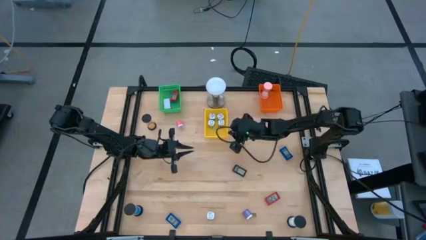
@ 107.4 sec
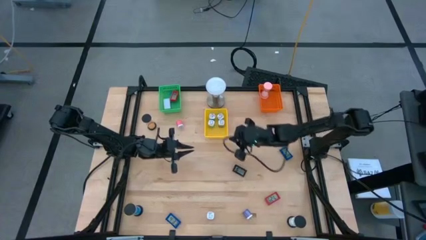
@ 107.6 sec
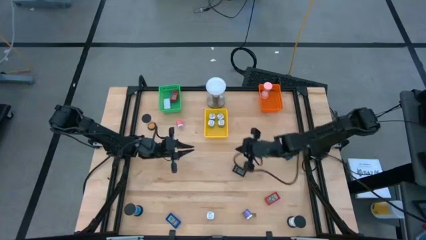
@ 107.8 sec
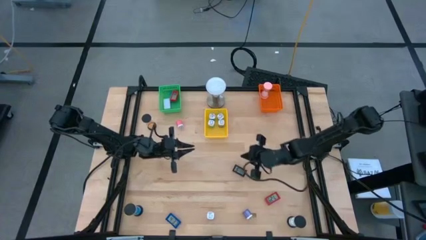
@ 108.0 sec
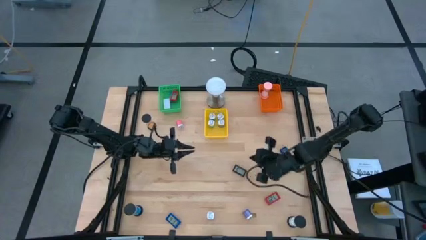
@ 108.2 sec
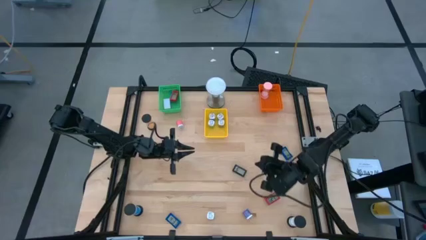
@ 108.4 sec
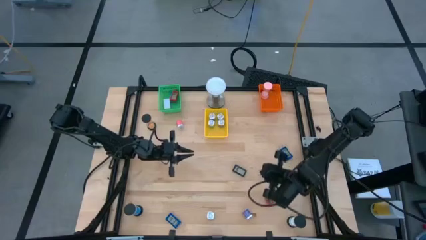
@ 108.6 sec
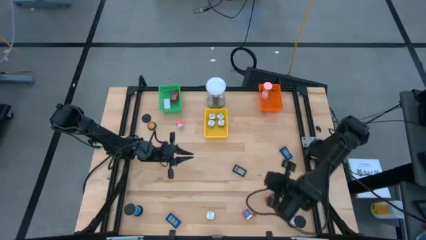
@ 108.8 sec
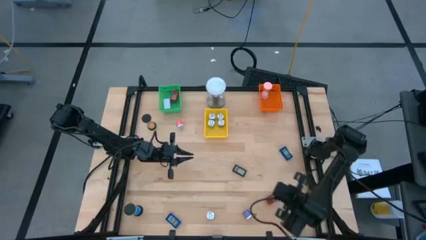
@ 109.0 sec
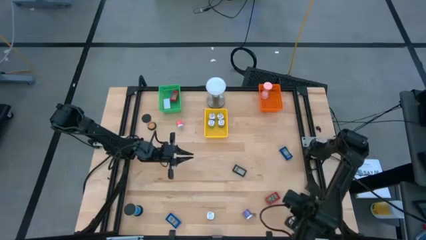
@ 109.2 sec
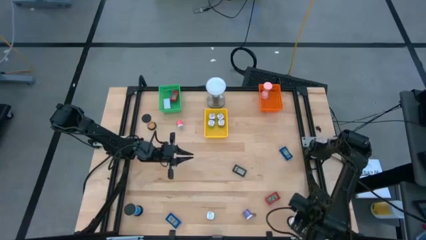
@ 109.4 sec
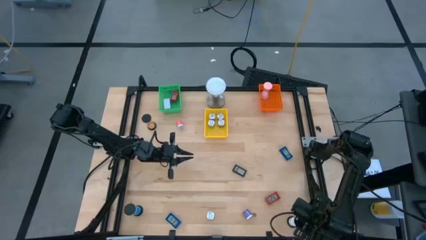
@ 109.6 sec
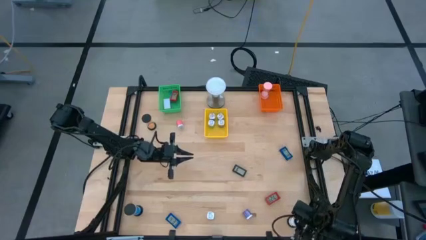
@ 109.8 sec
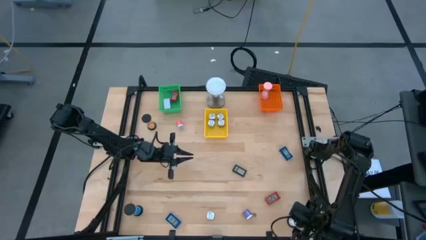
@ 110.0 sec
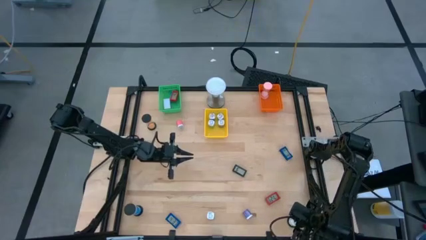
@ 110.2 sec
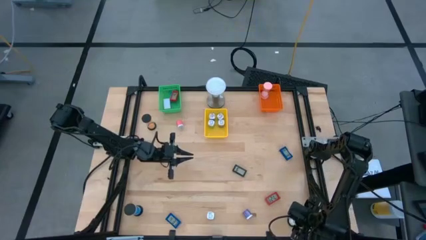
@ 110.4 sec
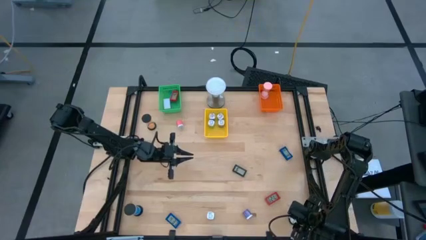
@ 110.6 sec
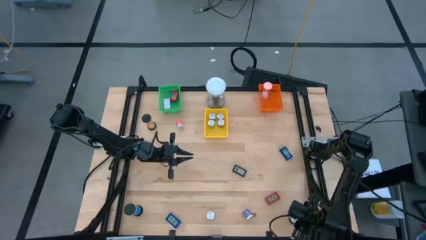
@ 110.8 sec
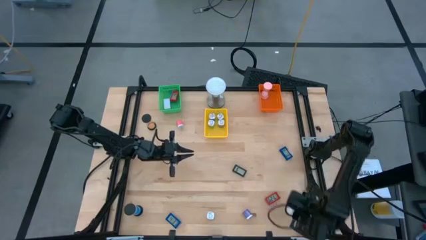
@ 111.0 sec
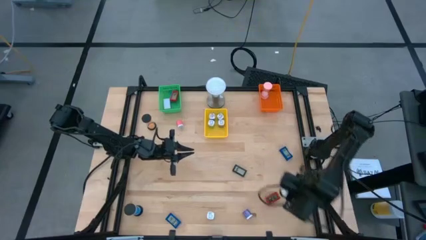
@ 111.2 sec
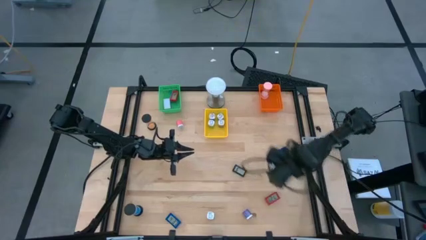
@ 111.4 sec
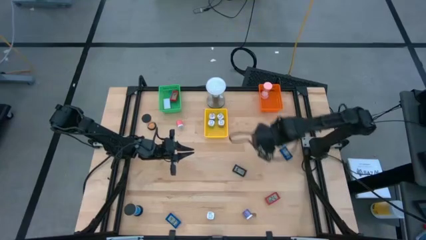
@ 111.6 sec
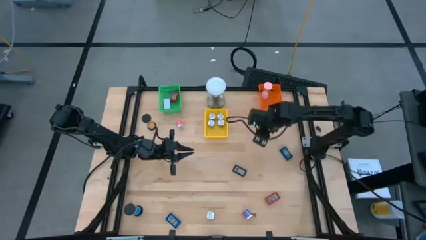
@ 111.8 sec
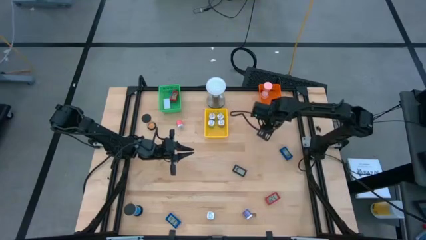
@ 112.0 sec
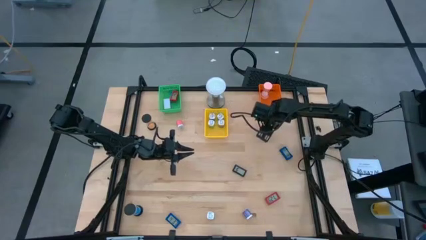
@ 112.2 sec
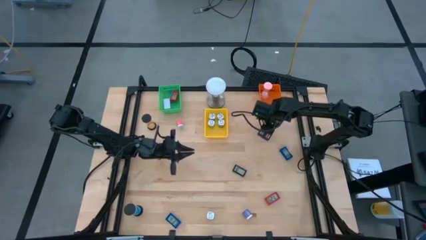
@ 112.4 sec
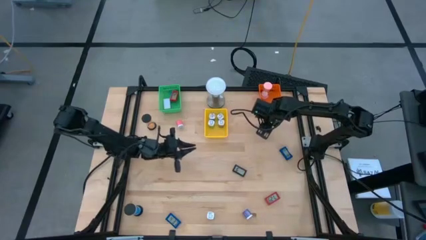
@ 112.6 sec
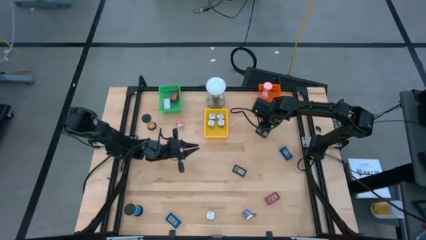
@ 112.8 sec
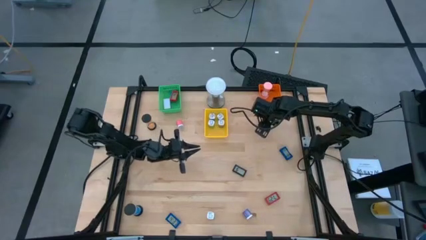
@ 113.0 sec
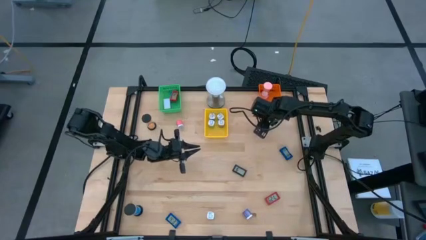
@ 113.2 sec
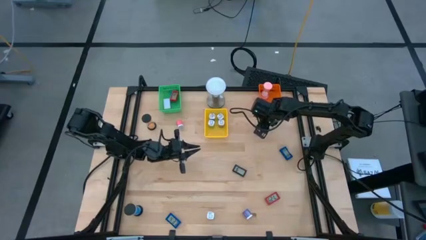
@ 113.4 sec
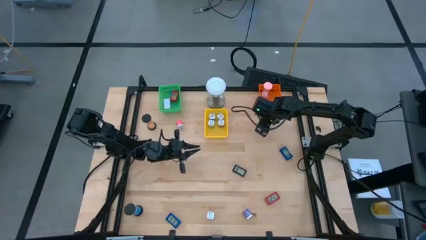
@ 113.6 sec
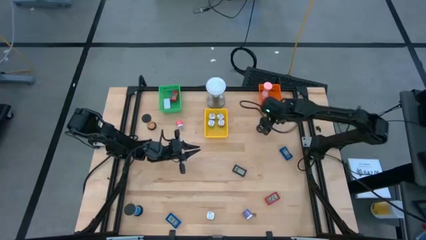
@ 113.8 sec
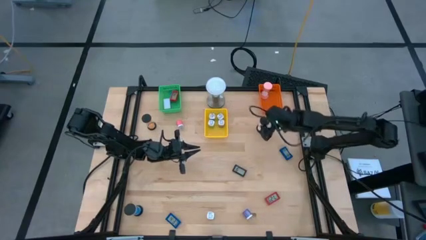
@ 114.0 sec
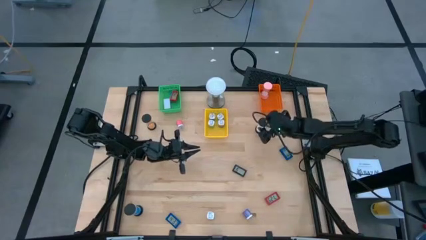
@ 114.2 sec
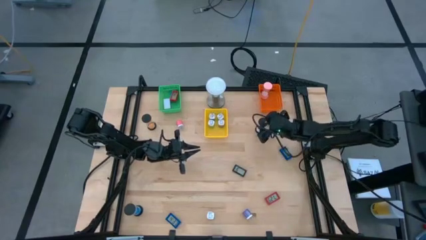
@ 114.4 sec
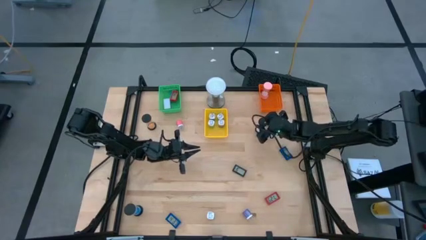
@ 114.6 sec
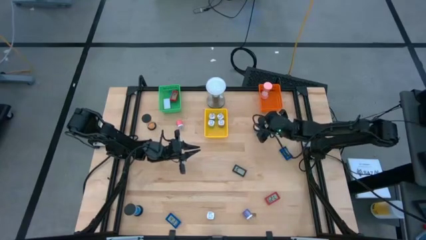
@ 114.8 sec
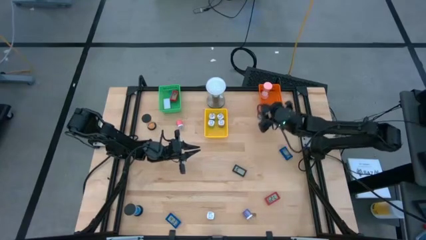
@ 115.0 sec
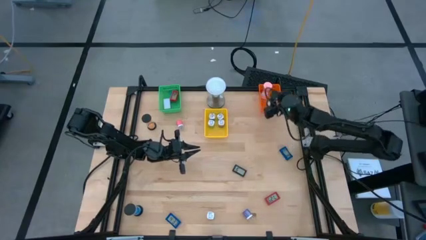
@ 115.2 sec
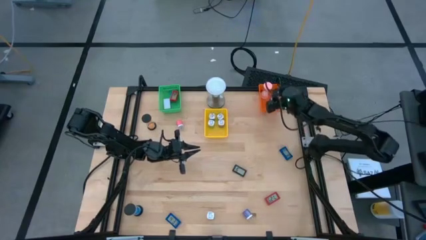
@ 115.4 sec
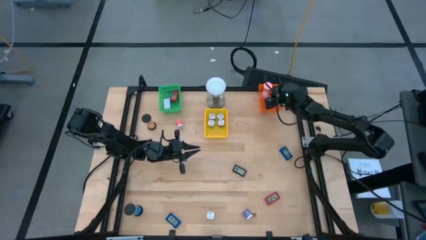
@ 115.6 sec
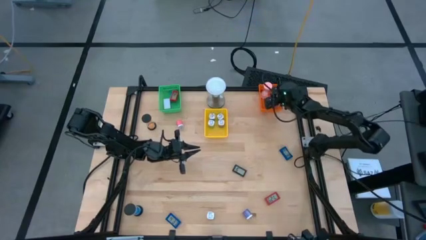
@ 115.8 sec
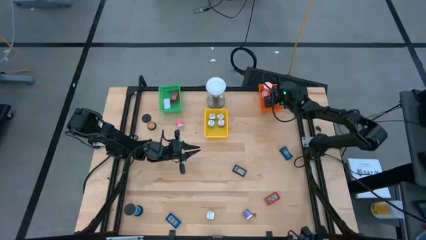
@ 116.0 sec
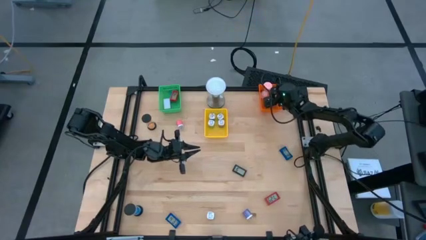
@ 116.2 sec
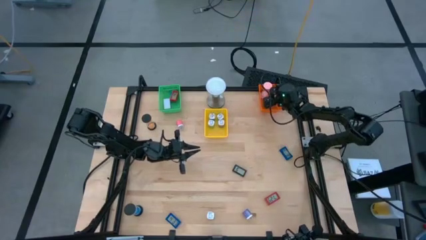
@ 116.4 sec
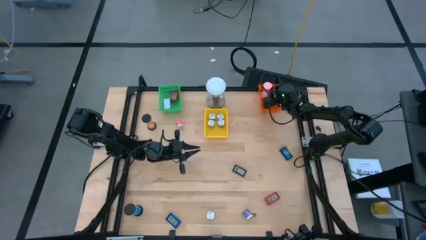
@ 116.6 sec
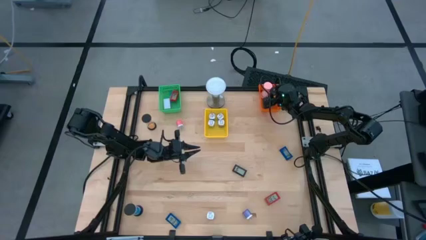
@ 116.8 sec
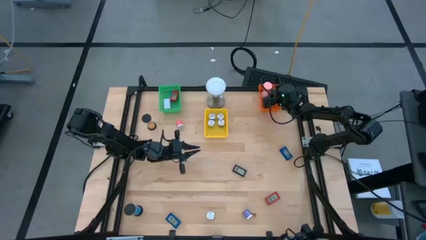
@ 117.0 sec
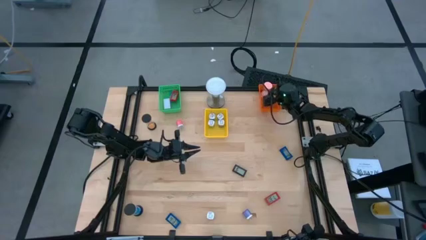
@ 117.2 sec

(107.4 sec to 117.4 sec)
Task: Pick & Place Office items
Put the black white hourglass into the orange bin

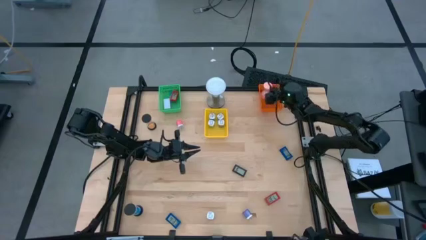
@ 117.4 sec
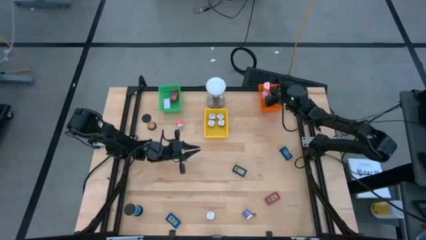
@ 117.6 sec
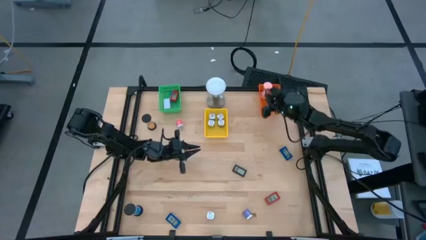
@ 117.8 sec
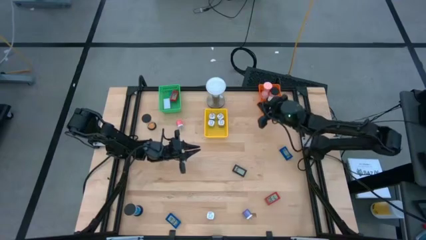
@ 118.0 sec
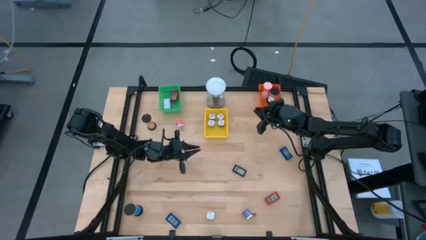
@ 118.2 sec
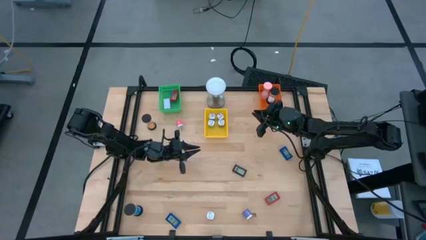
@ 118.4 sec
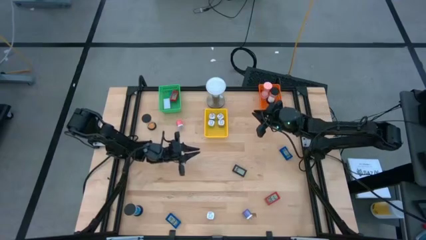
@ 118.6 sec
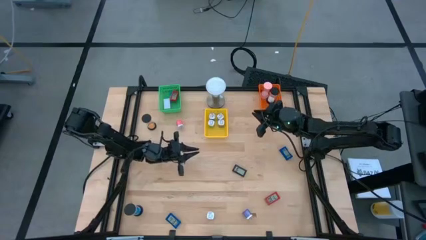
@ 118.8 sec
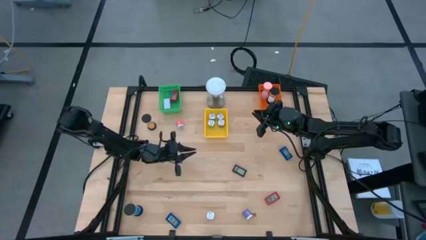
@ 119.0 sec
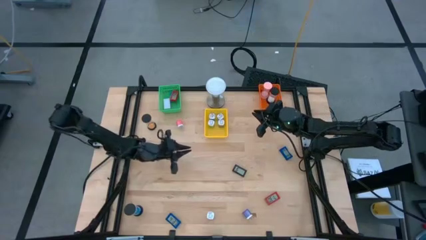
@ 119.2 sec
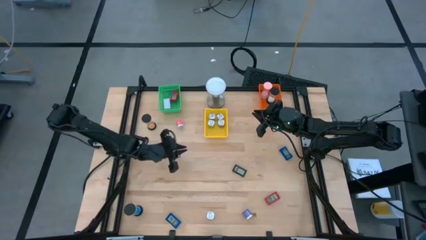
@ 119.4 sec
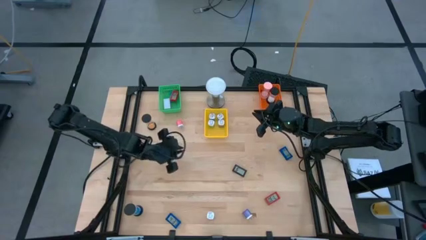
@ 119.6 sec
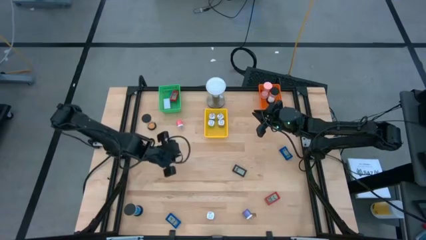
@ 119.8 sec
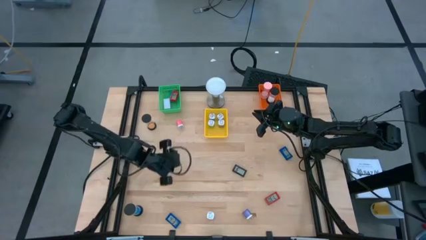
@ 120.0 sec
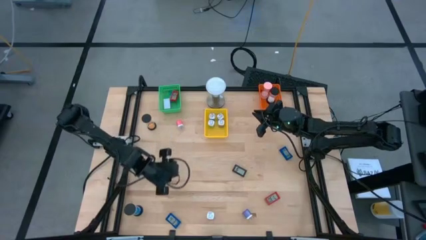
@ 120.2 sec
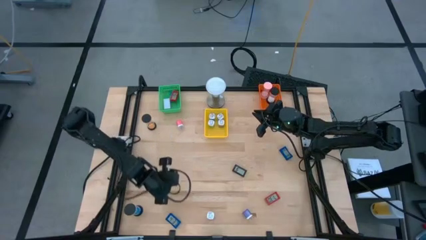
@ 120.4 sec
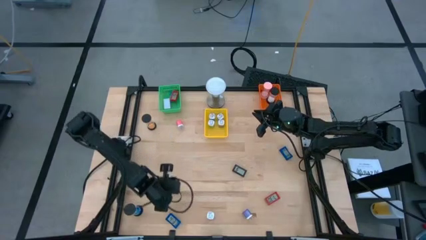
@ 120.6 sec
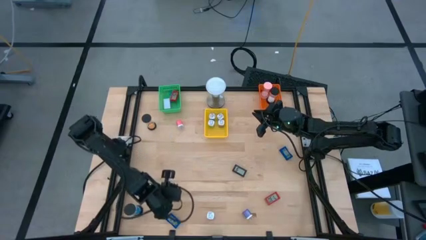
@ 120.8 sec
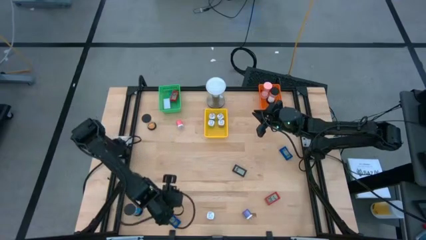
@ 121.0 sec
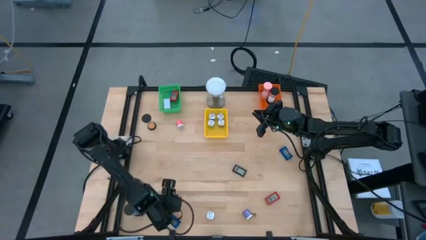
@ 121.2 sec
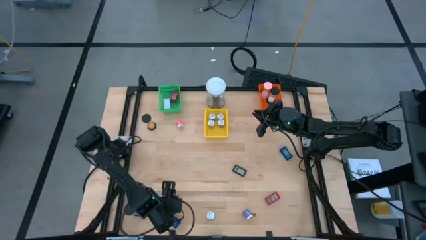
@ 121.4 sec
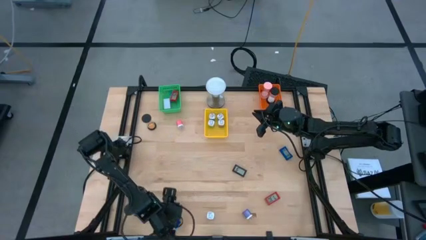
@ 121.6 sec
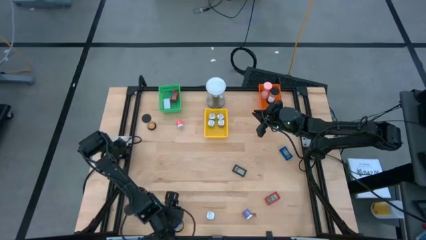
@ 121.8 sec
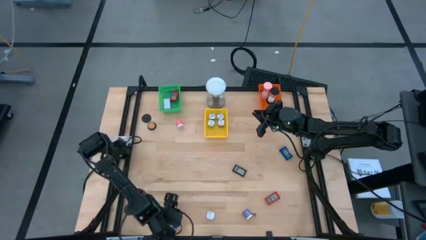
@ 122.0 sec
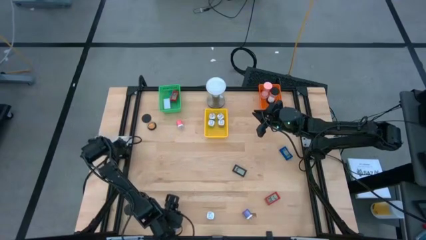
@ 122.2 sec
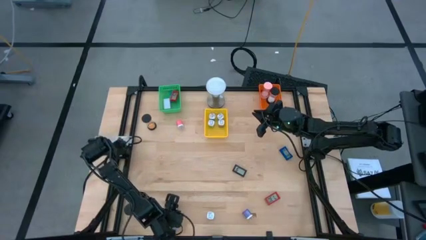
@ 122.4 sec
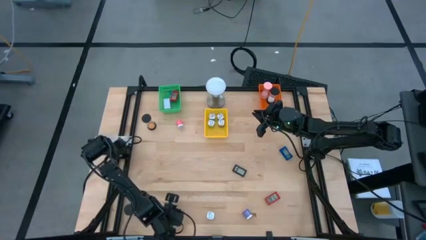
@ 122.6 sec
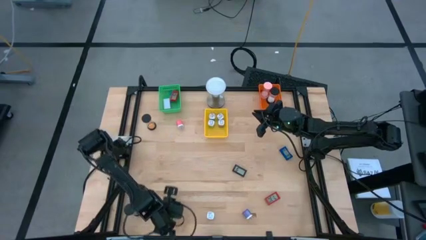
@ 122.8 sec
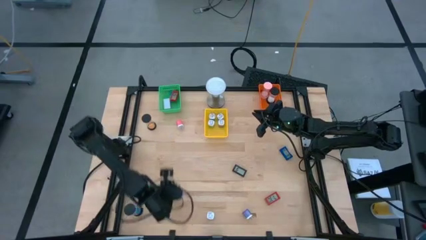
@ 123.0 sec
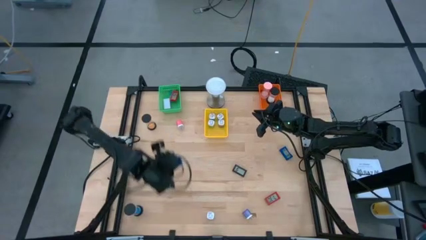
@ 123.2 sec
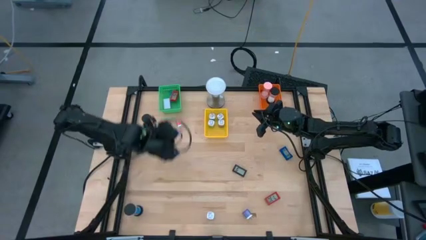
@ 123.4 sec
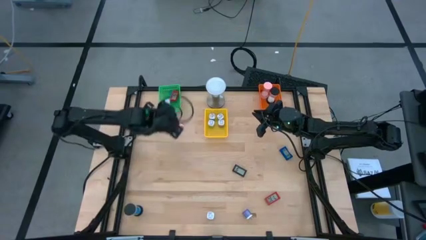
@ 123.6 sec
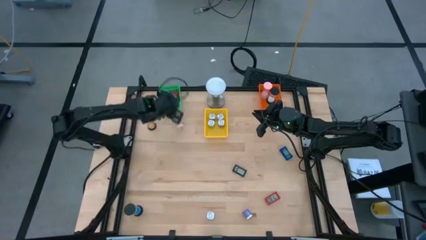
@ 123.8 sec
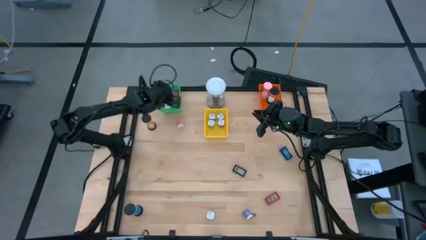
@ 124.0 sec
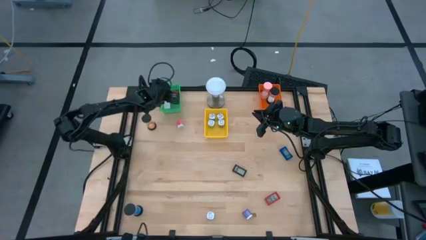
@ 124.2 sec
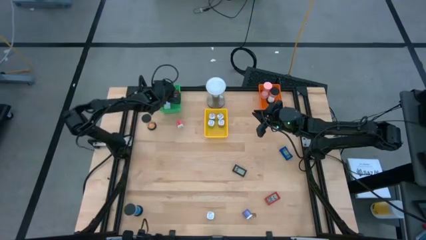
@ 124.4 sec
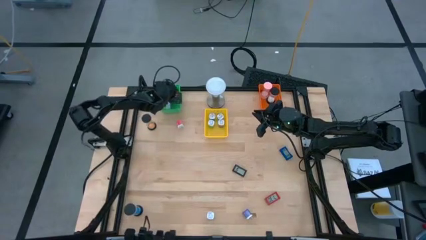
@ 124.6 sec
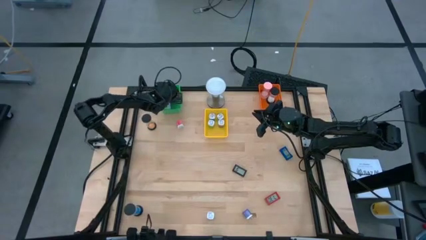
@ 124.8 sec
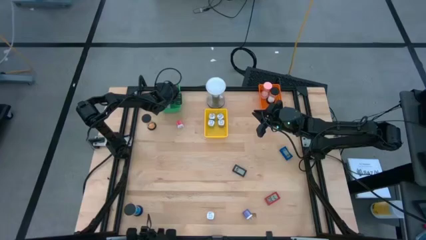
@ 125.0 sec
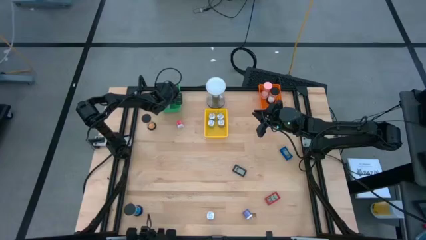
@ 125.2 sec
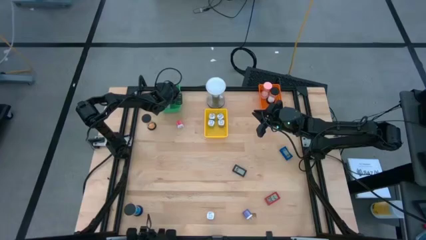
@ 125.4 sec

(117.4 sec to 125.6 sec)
Put the bottom blue digital clock into the green bin
